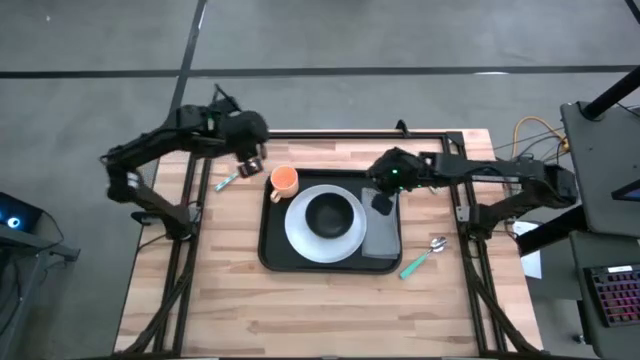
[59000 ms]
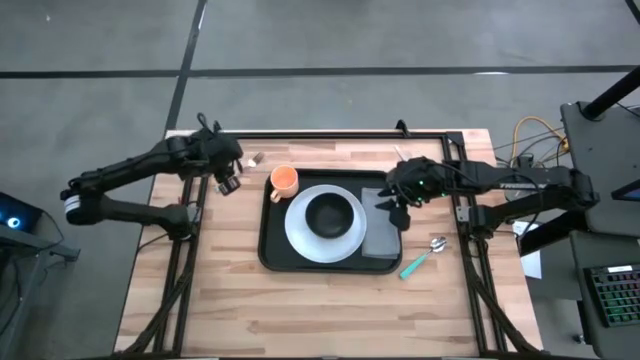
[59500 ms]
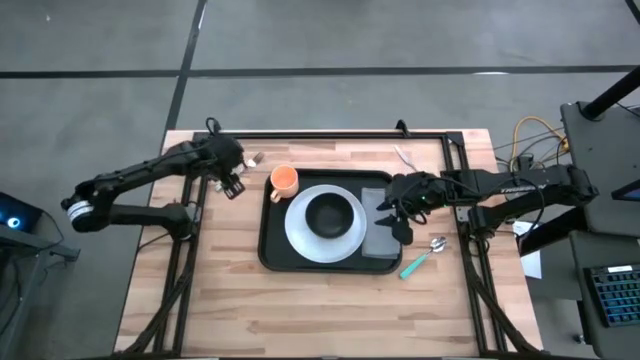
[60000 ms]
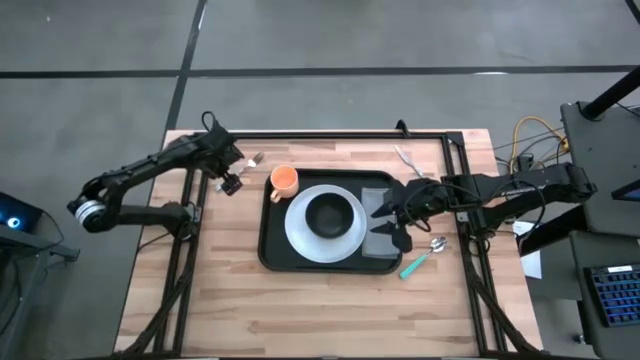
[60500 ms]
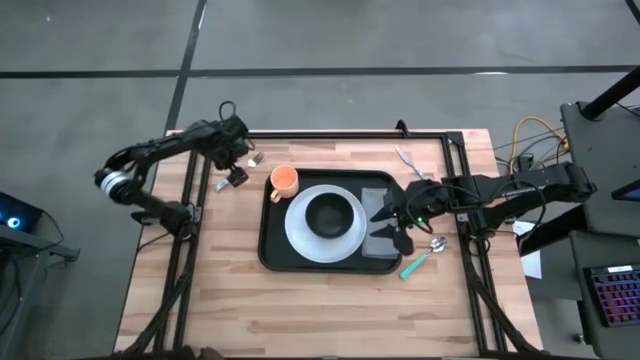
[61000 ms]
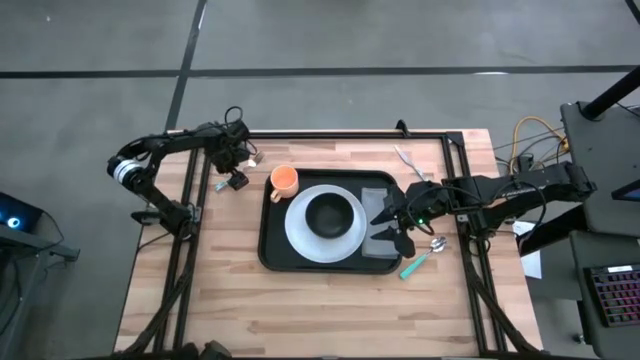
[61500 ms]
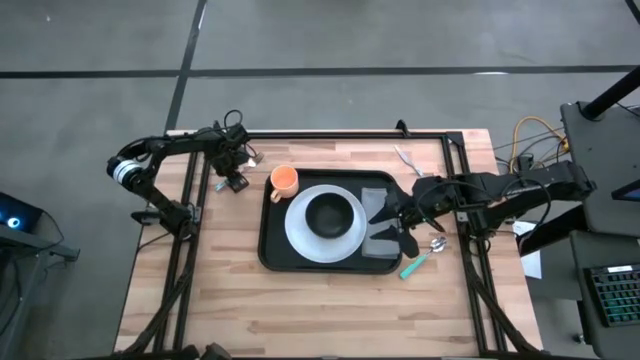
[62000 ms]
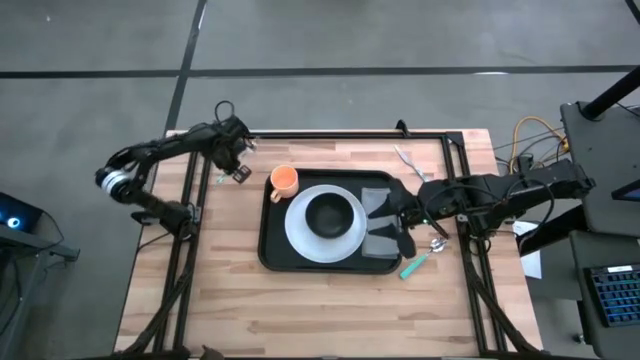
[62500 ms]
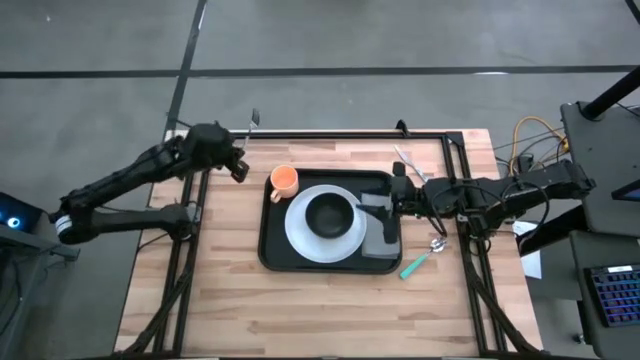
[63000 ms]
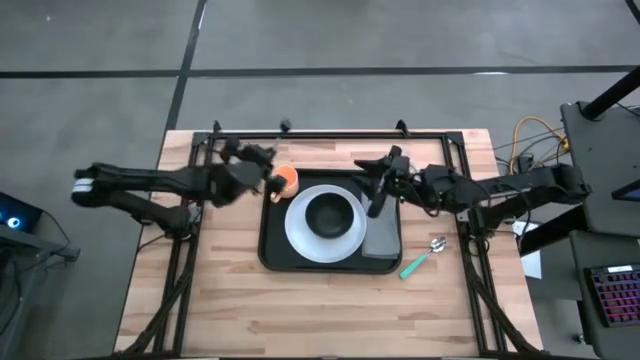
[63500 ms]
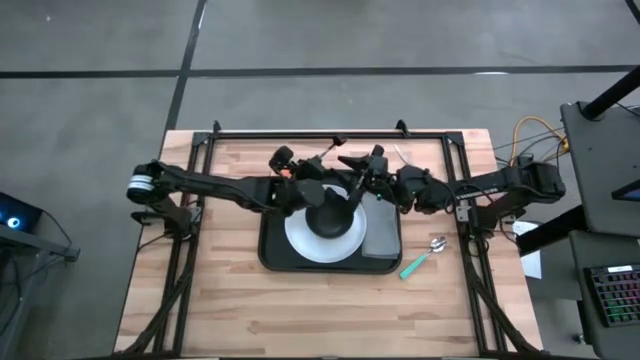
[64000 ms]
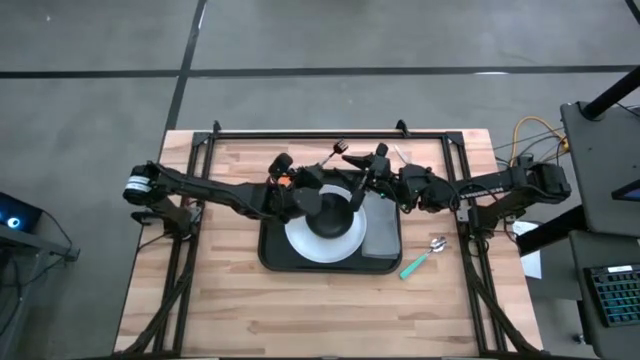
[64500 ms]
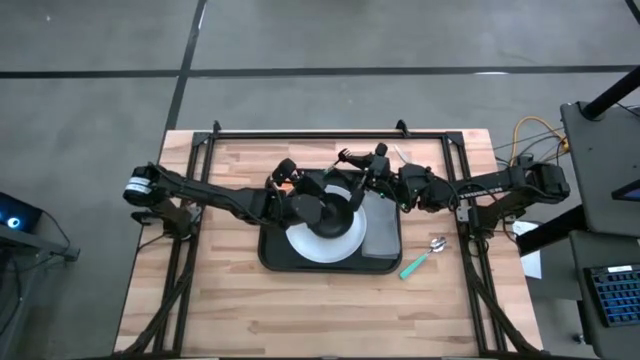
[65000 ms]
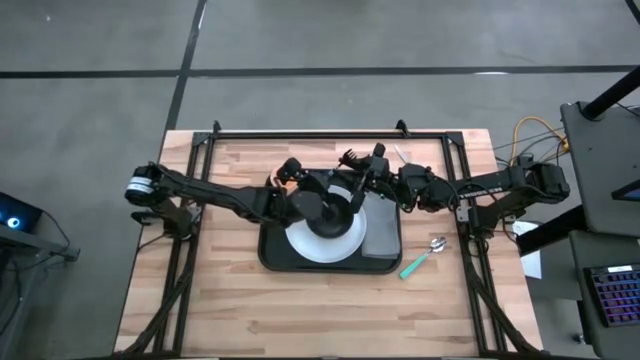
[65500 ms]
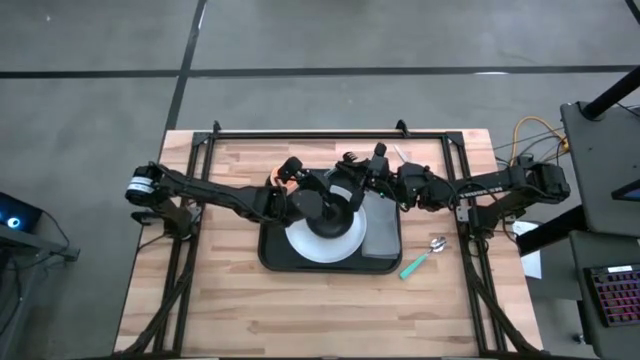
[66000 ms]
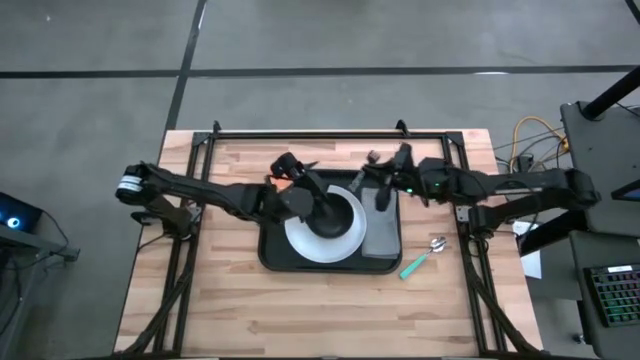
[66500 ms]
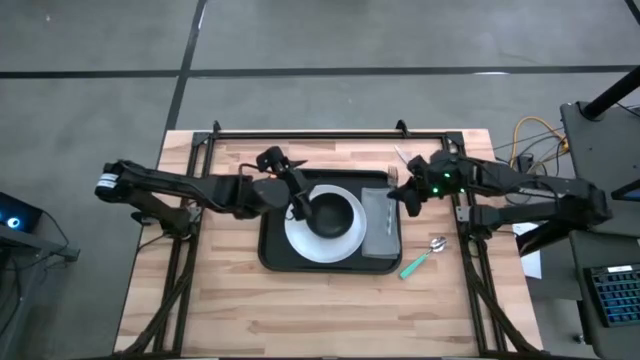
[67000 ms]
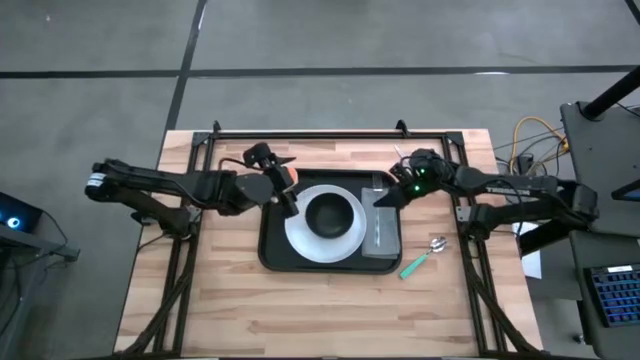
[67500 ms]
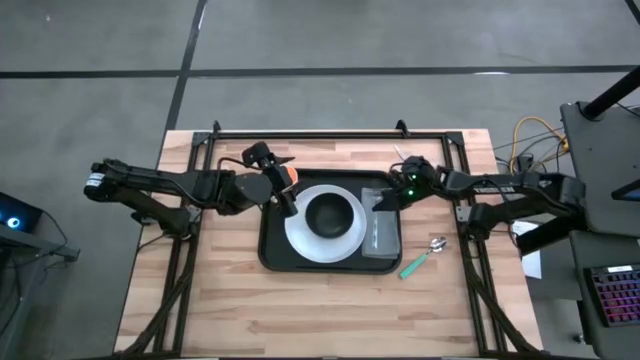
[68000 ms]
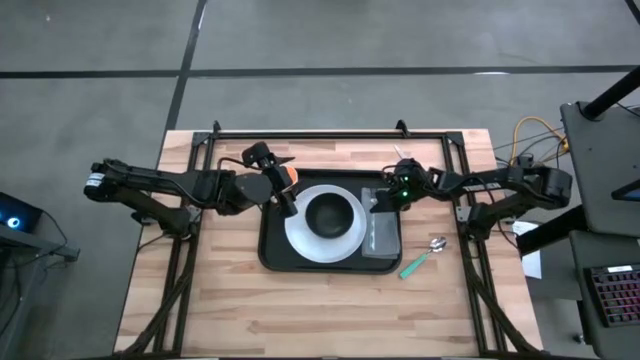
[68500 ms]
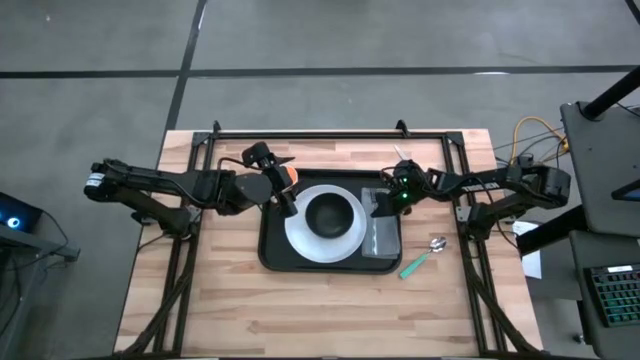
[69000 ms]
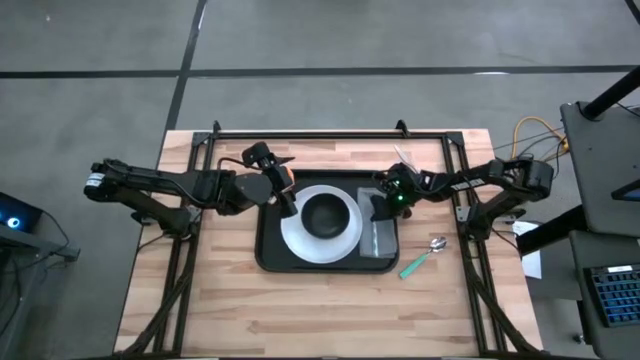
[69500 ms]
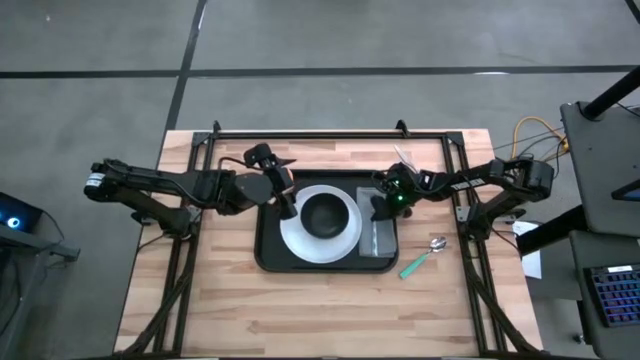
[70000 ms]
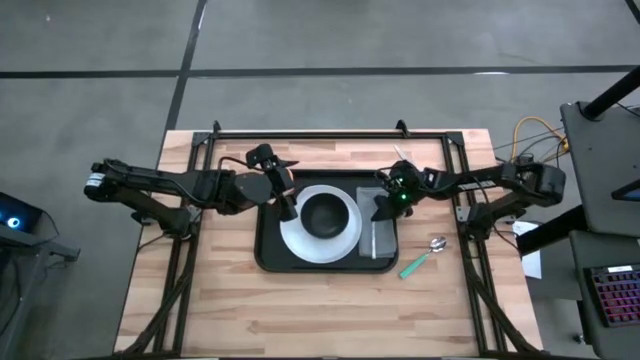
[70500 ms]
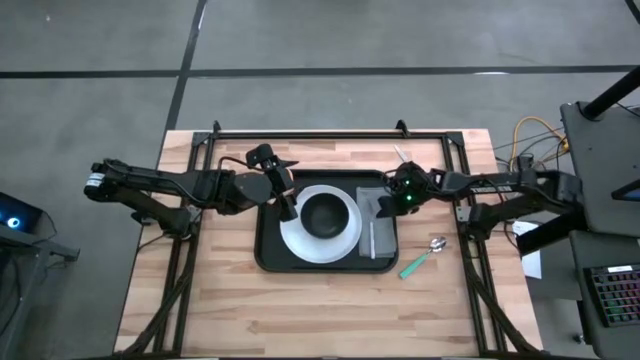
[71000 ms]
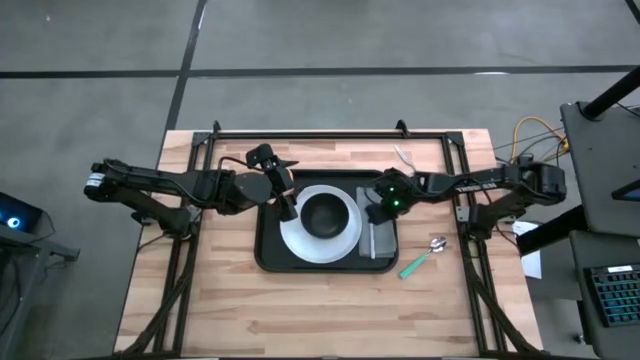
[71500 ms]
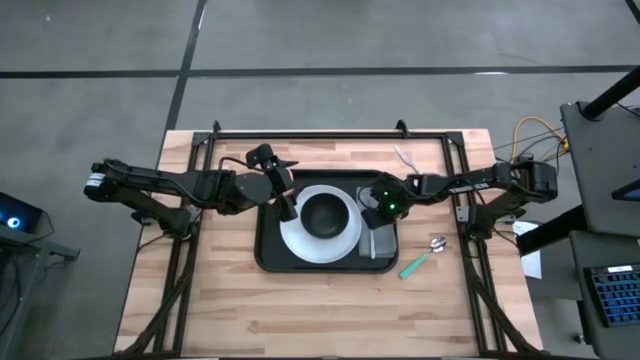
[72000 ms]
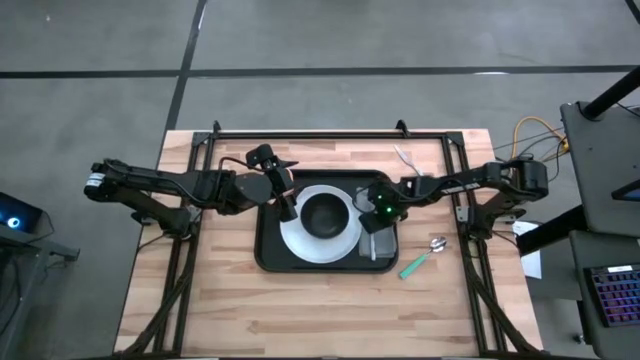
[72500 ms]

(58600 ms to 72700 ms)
Task: Set up tray
Put the blue fork on top of the gray table napkin on the black serving tray

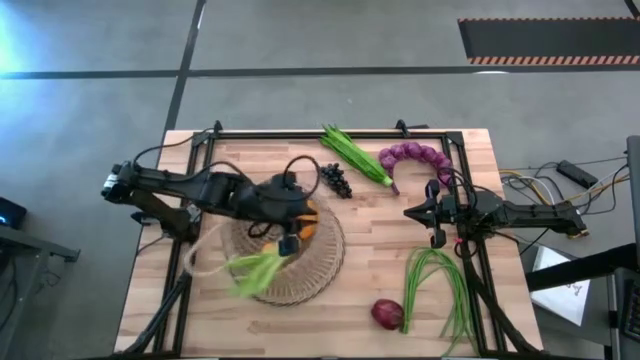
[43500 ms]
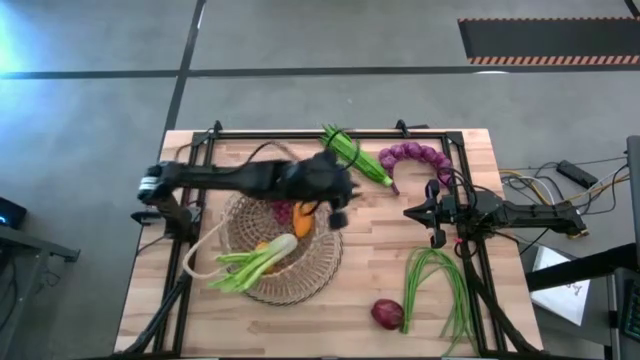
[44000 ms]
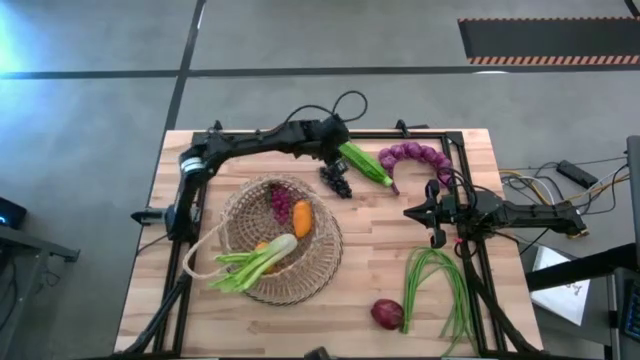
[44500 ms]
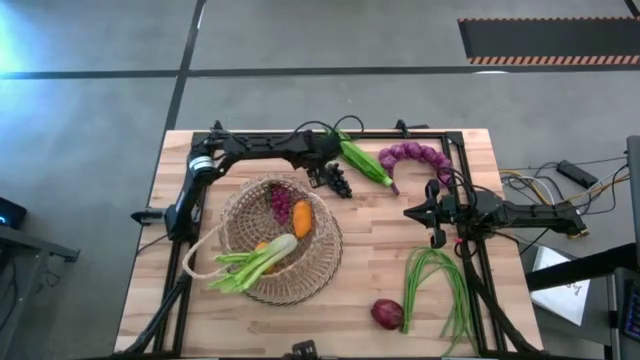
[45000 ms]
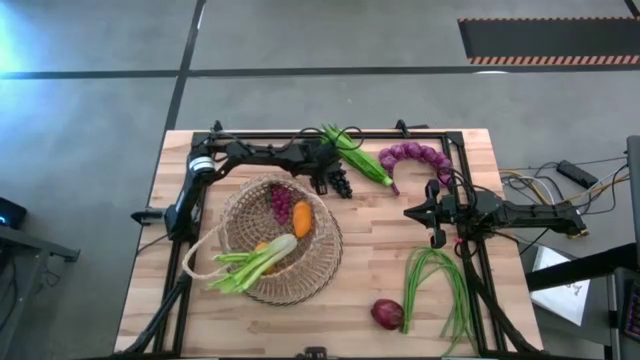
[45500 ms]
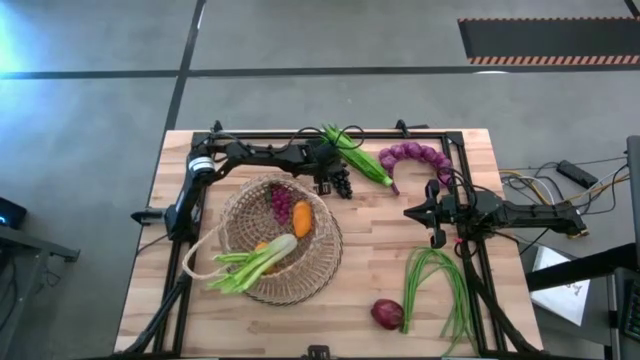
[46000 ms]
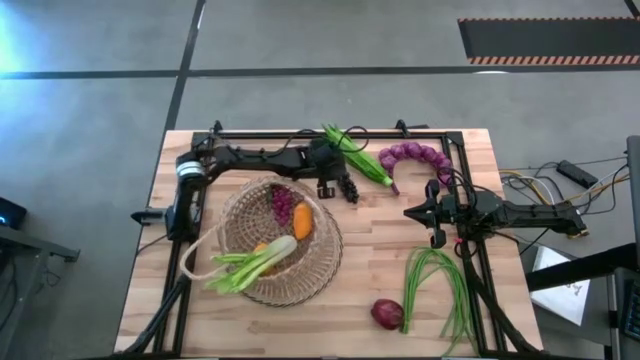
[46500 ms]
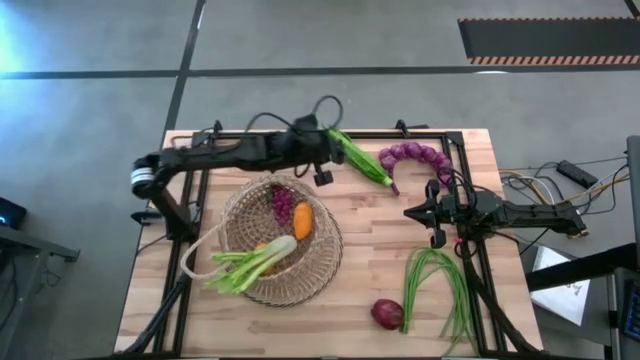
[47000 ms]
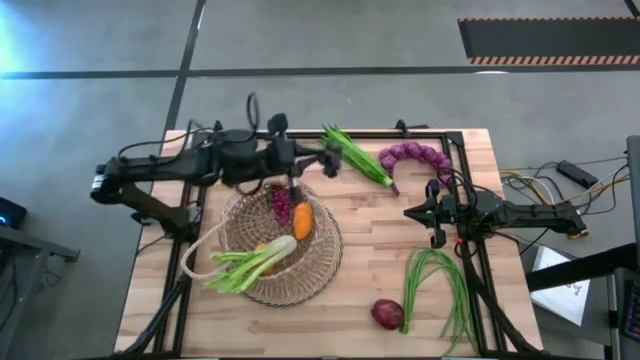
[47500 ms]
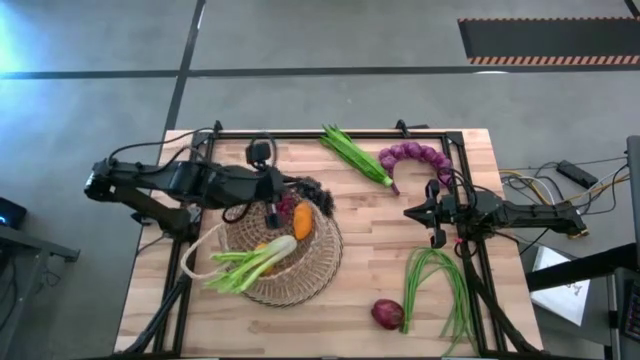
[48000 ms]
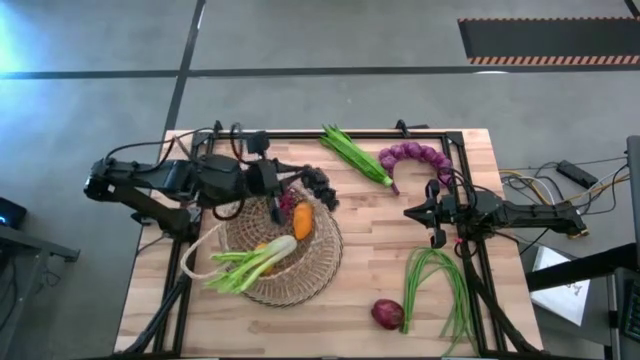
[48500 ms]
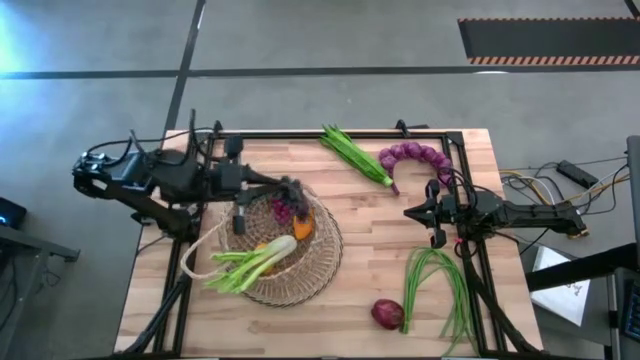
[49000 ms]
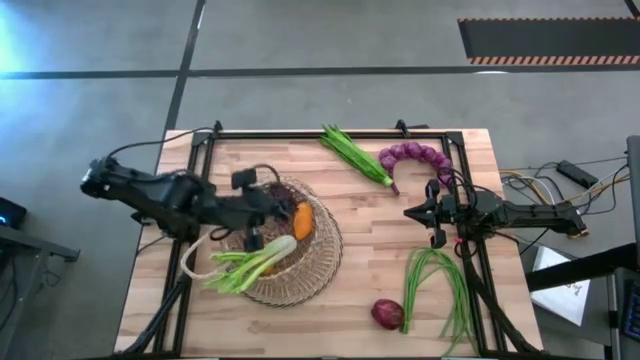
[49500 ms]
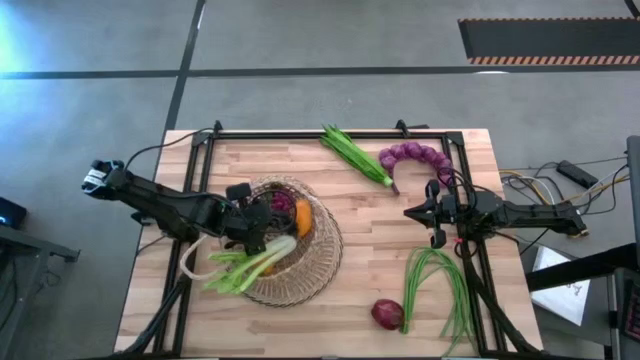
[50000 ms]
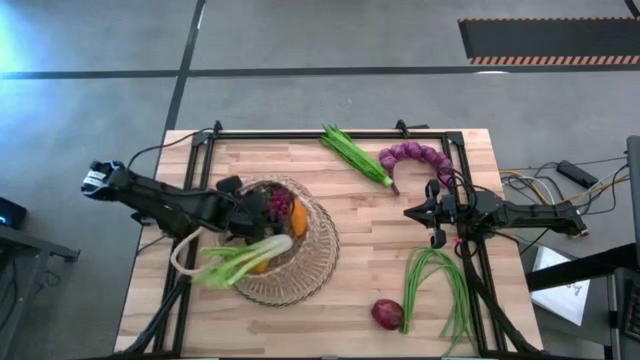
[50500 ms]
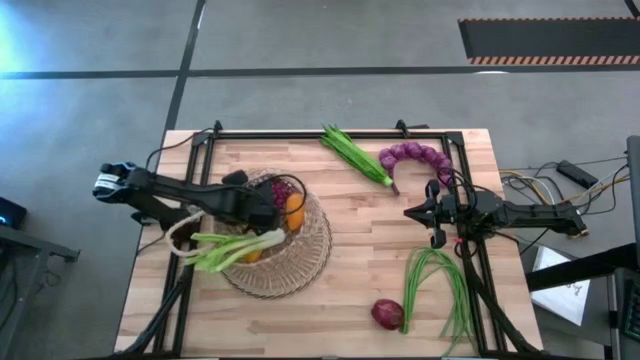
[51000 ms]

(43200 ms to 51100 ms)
Task: Build produce basket
Put the black grapes into the basket
